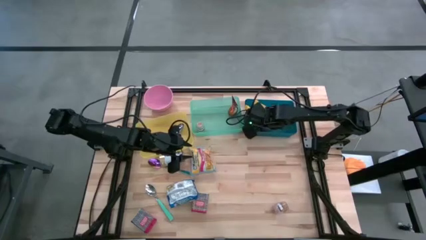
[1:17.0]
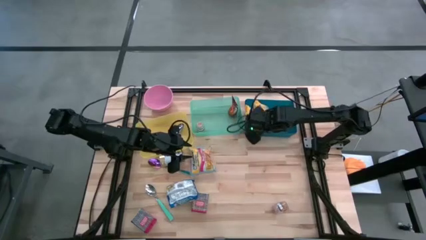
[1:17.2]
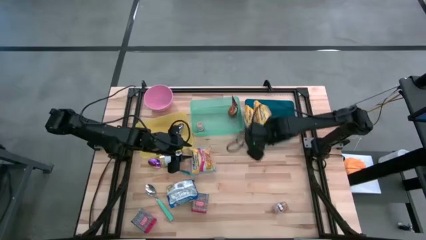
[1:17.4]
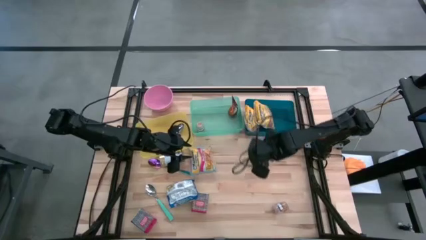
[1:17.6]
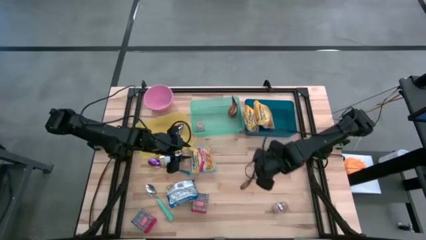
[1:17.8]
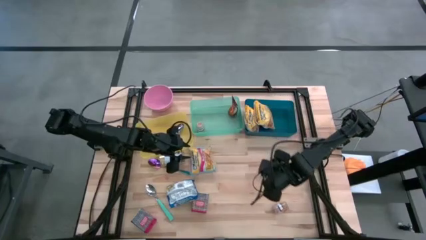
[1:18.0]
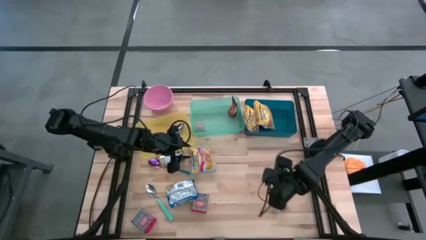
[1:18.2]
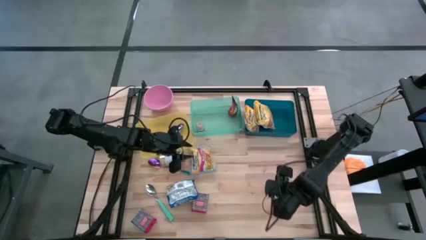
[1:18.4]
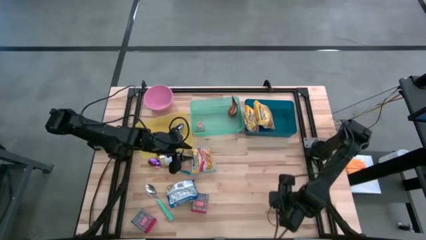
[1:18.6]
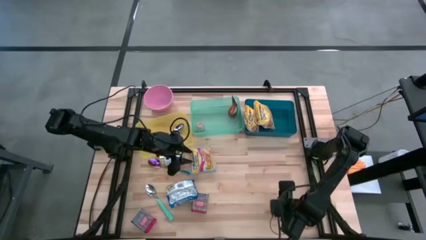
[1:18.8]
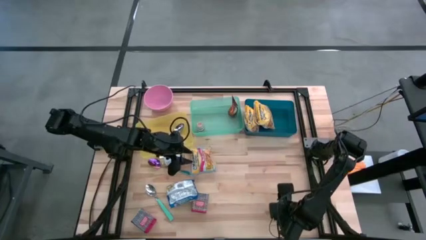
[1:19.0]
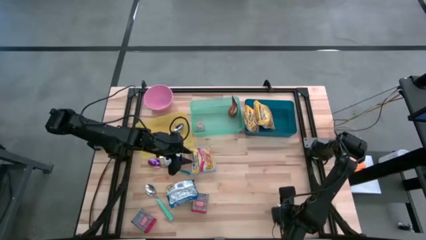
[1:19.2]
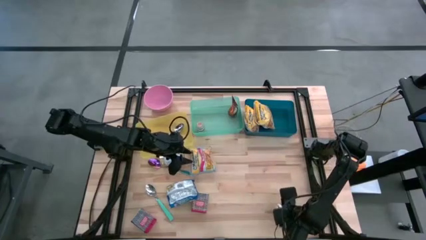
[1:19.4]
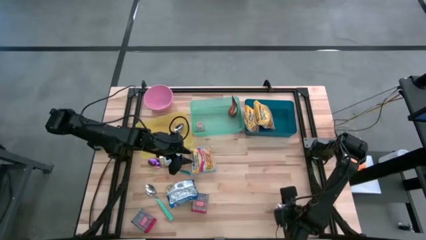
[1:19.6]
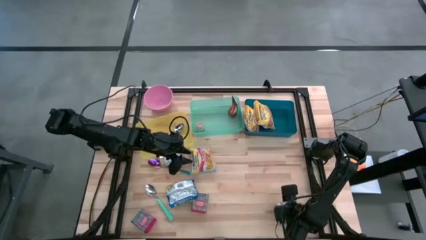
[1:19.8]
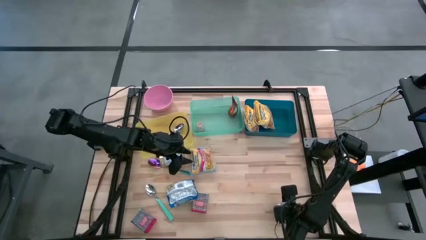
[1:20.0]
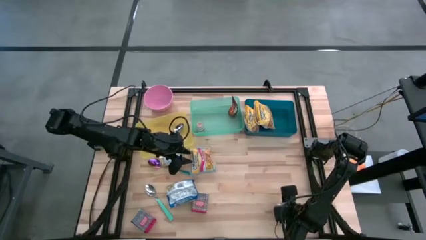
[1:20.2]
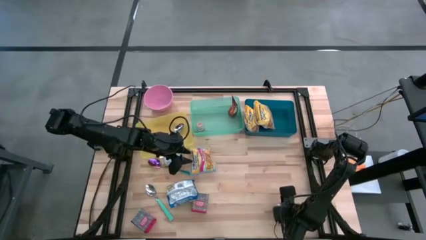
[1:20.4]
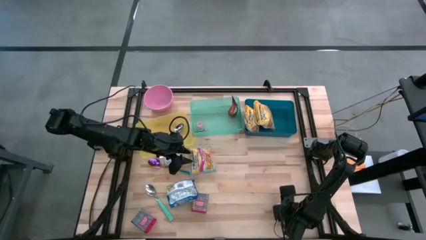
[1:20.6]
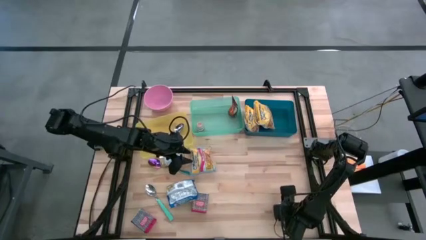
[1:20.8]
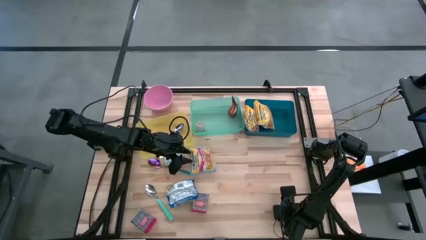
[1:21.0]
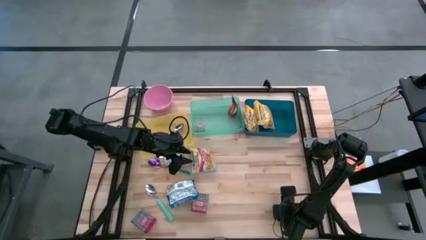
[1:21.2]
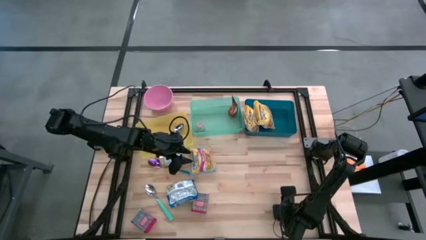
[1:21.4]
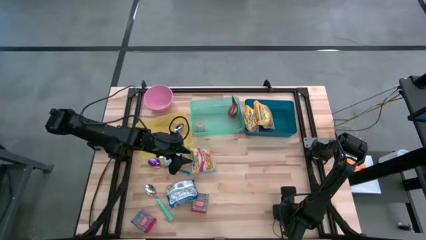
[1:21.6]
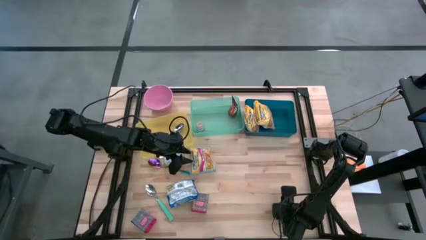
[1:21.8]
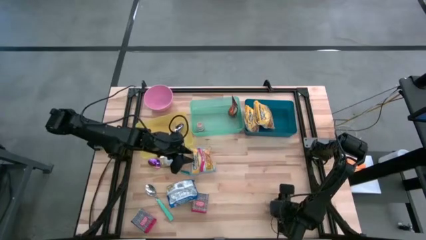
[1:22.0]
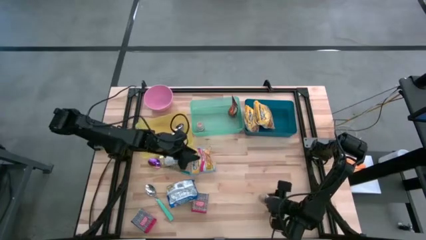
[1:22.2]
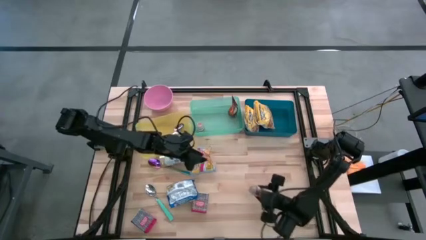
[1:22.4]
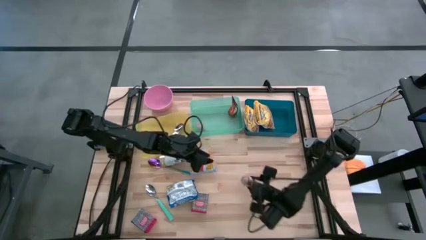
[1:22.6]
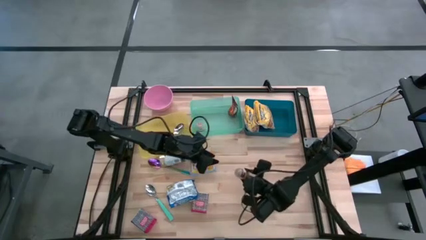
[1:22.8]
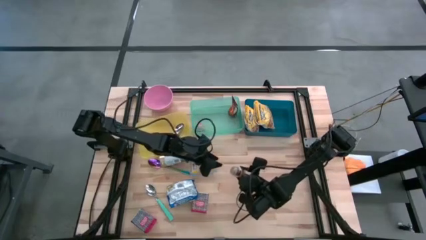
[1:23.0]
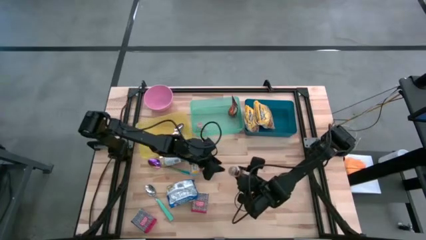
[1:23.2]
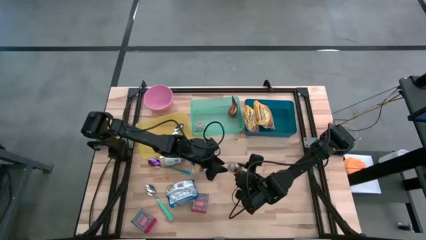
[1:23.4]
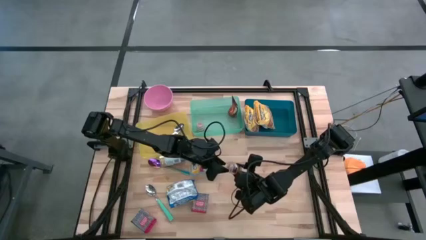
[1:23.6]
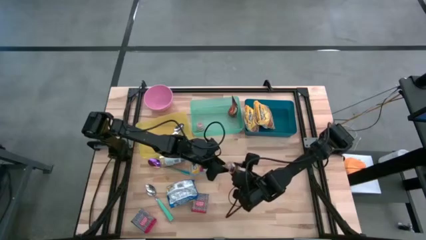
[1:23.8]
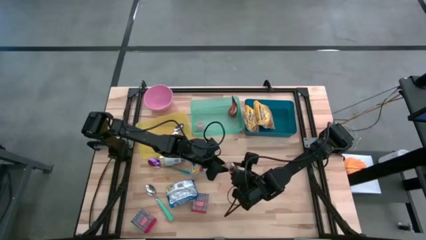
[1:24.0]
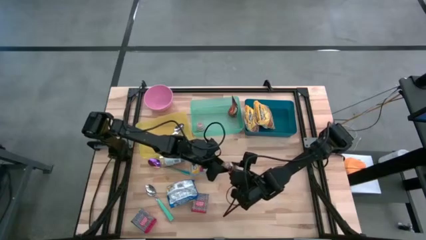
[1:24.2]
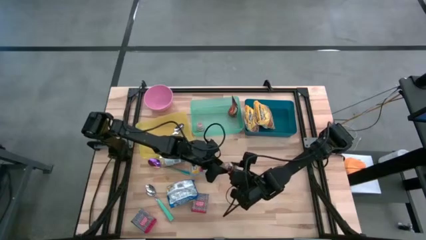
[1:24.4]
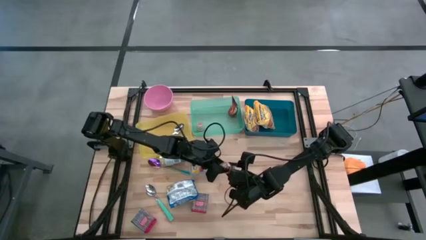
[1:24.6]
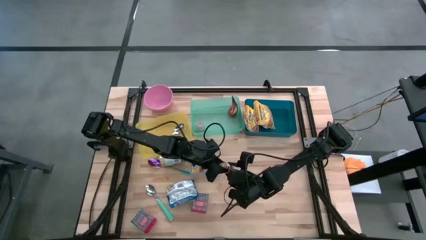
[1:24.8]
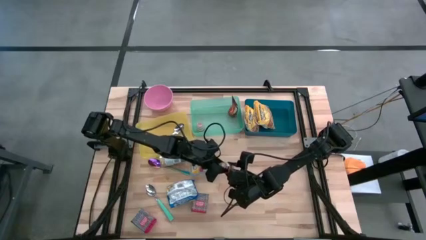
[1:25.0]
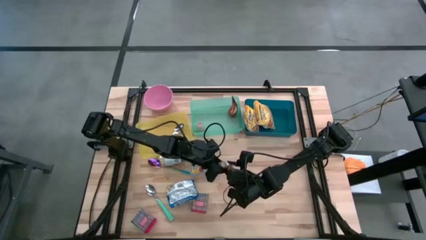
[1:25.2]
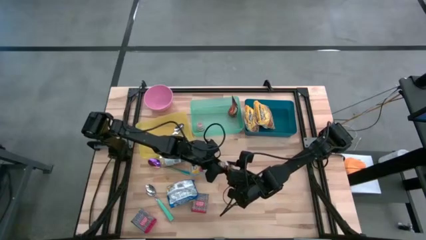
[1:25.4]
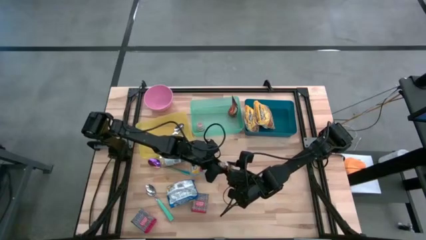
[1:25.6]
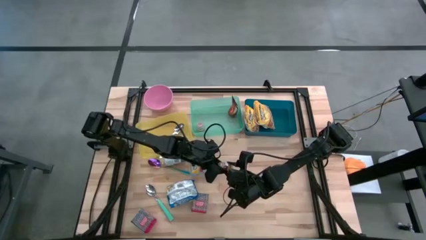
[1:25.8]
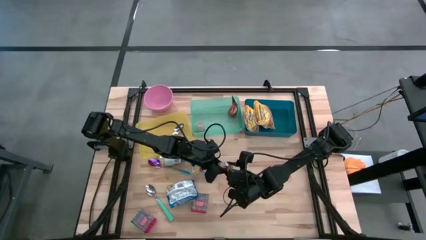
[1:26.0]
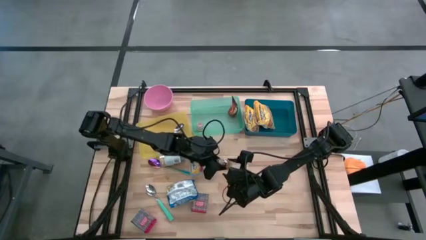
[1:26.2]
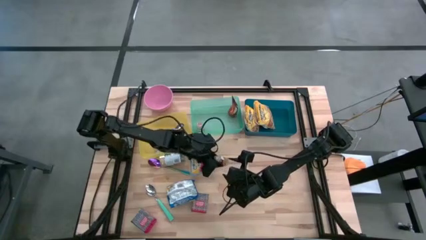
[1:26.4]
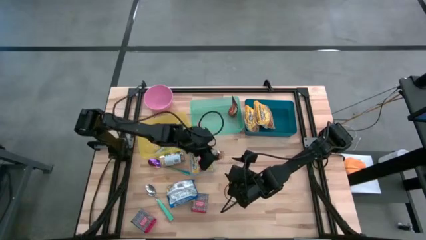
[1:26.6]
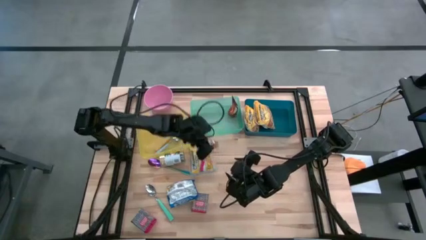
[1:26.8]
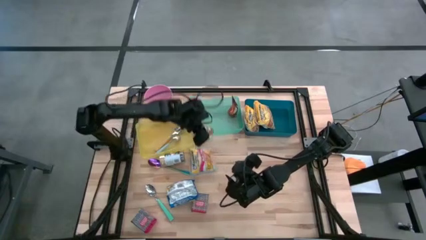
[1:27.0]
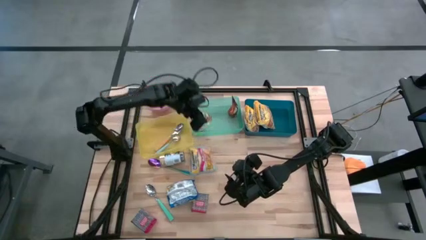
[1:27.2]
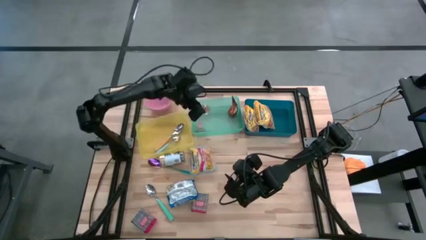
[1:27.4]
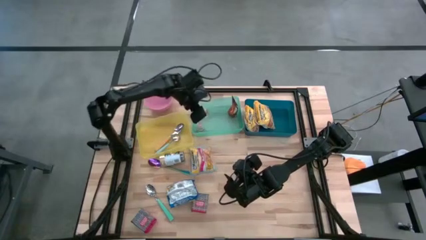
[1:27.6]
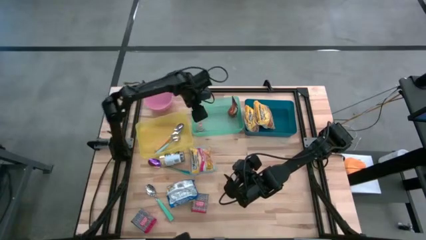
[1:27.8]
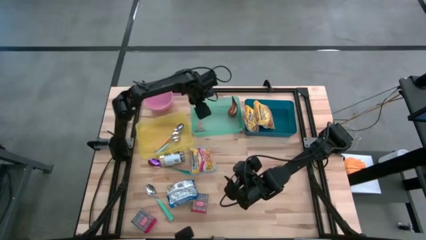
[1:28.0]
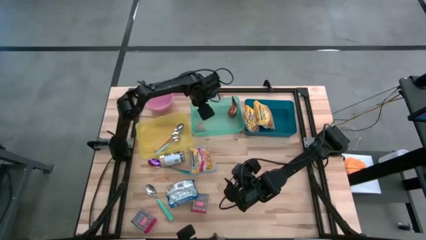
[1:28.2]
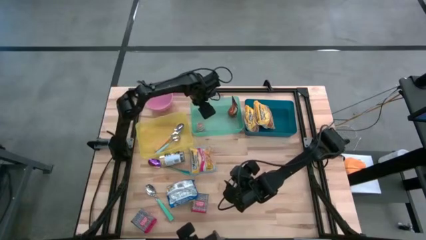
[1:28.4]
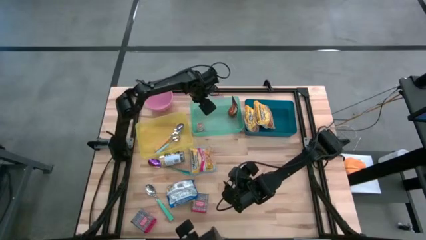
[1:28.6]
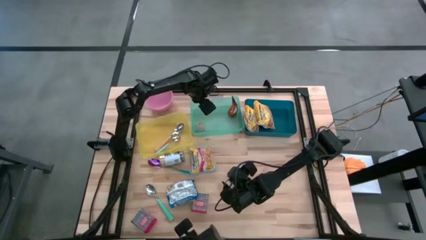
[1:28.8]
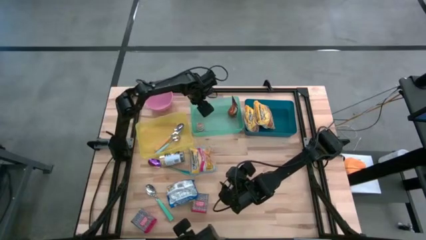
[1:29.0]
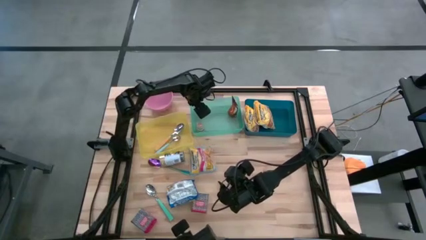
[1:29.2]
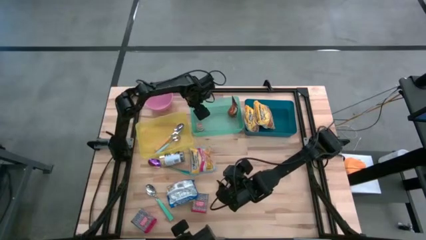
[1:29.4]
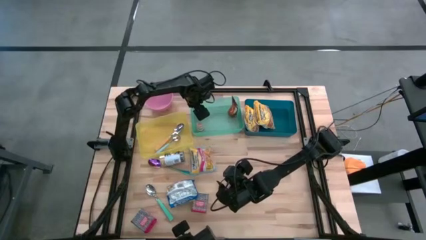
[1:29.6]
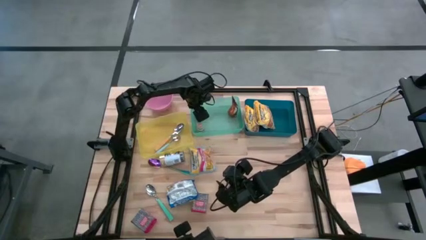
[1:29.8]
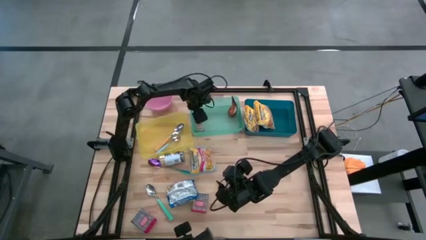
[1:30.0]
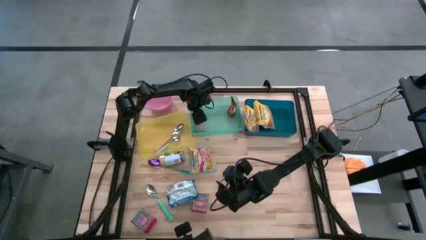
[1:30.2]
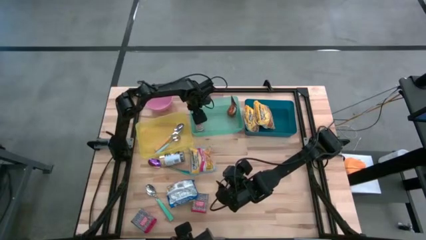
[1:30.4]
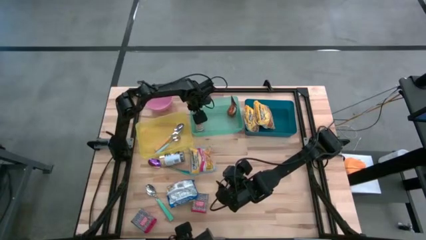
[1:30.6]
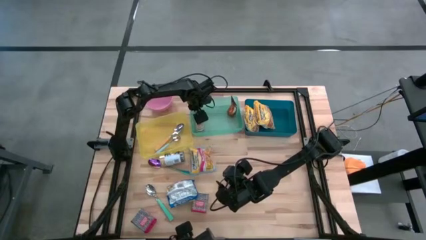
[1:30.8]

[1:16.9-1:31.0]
Put the brown seasoning bottle into the green bin
